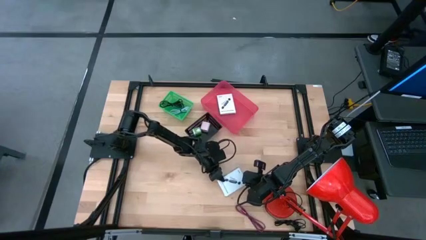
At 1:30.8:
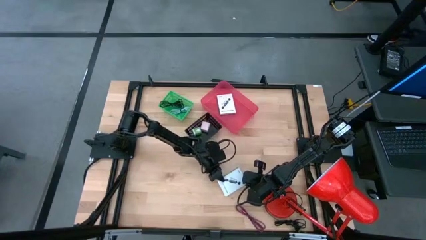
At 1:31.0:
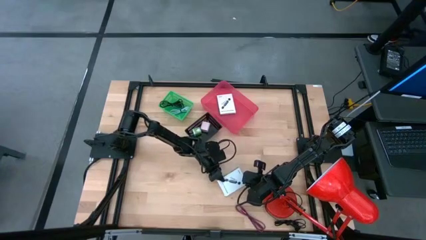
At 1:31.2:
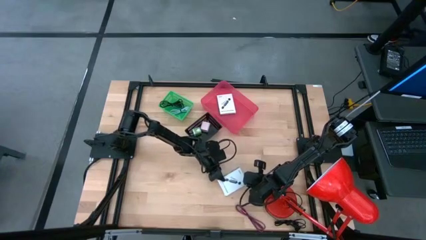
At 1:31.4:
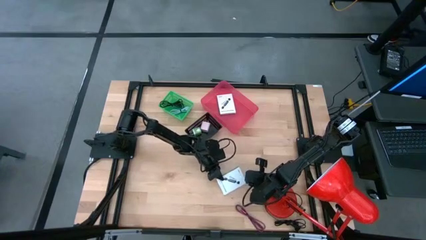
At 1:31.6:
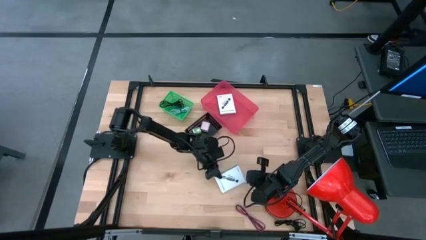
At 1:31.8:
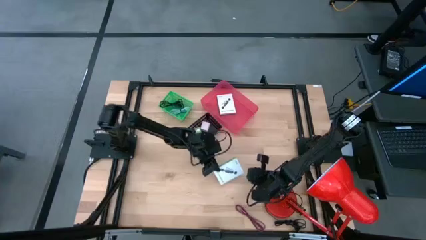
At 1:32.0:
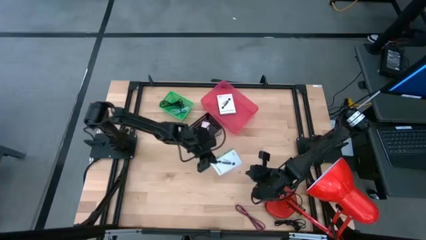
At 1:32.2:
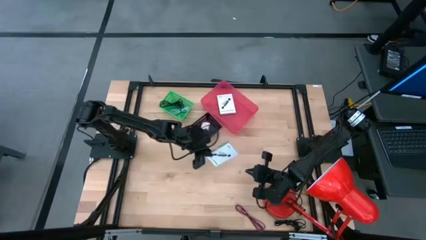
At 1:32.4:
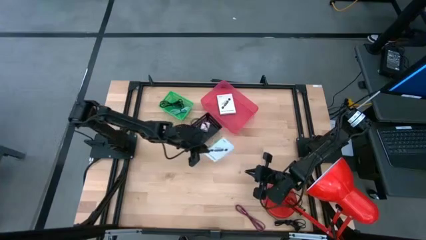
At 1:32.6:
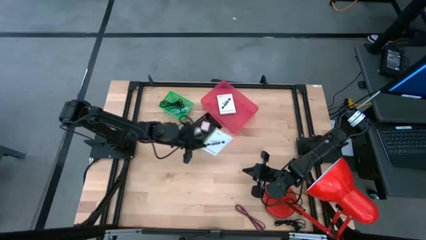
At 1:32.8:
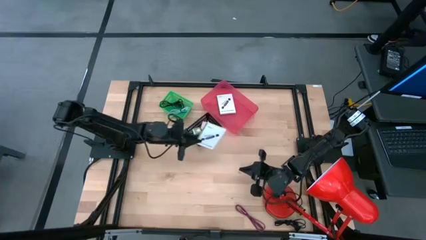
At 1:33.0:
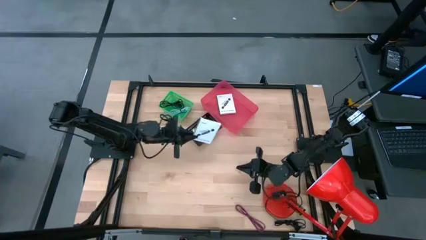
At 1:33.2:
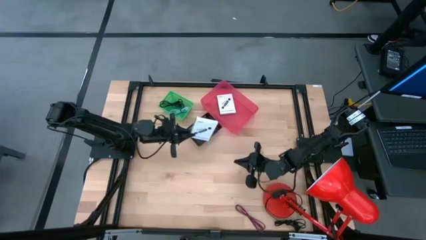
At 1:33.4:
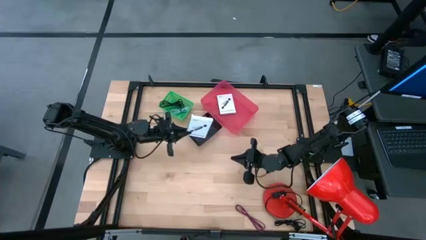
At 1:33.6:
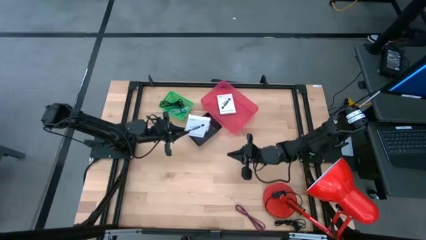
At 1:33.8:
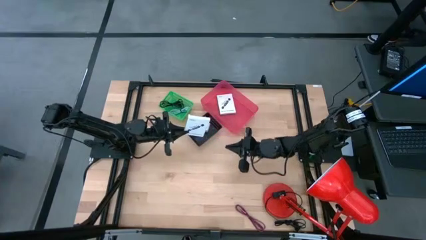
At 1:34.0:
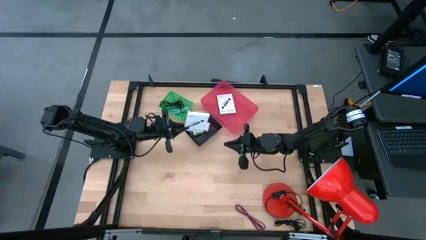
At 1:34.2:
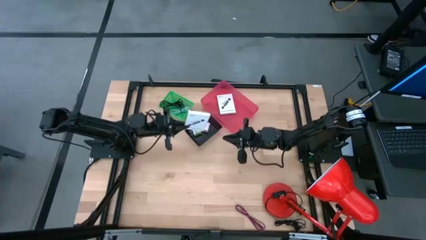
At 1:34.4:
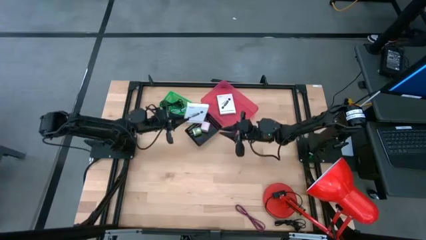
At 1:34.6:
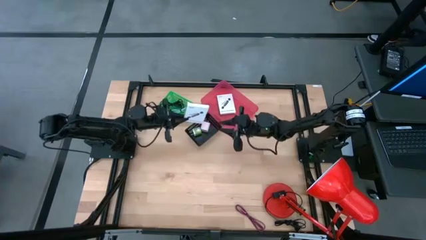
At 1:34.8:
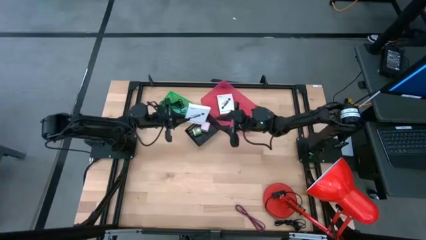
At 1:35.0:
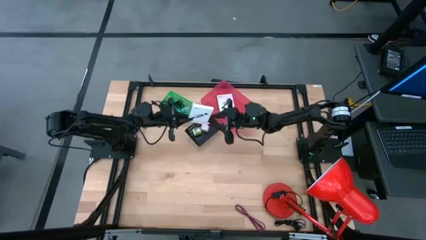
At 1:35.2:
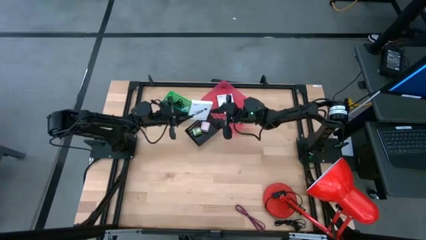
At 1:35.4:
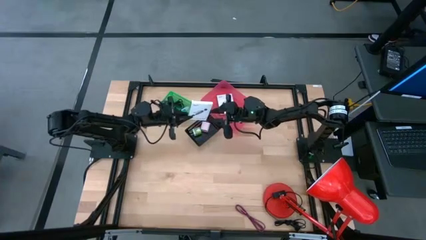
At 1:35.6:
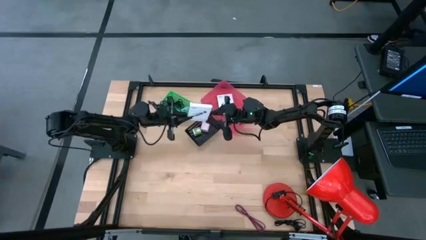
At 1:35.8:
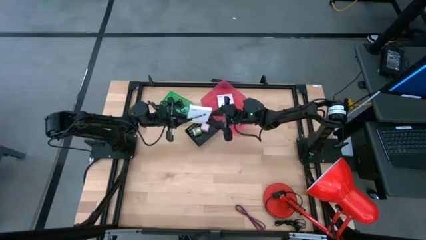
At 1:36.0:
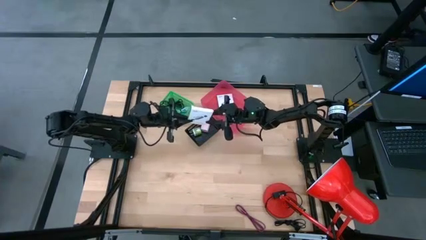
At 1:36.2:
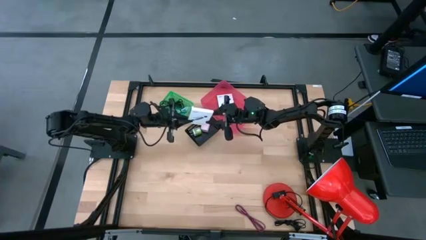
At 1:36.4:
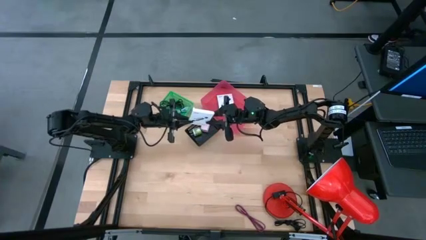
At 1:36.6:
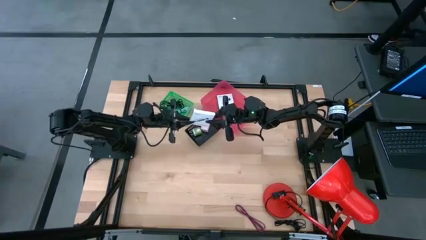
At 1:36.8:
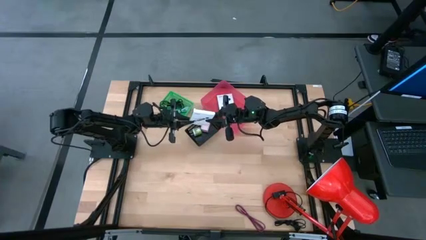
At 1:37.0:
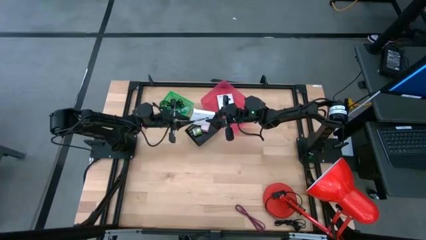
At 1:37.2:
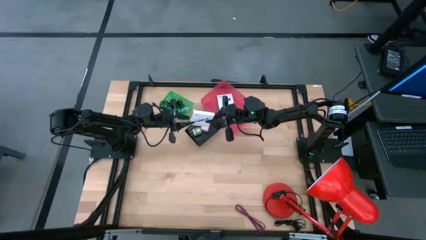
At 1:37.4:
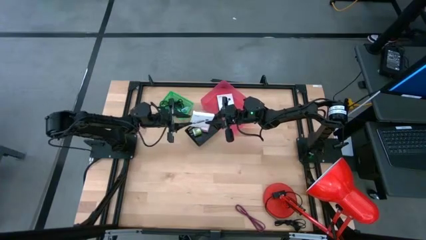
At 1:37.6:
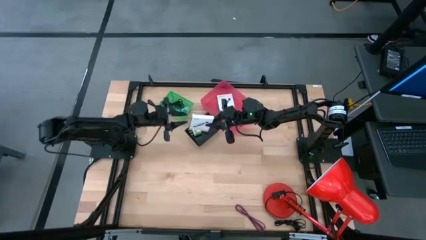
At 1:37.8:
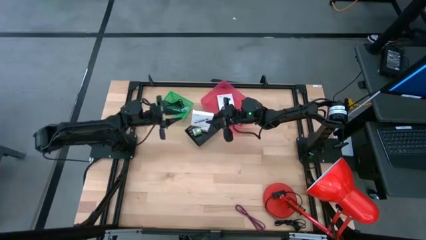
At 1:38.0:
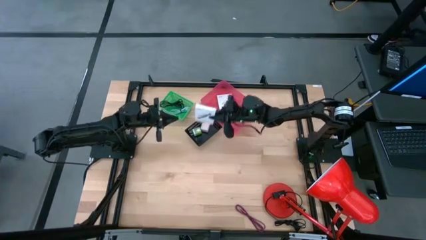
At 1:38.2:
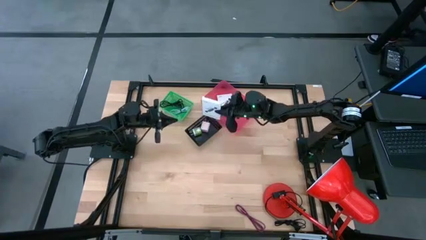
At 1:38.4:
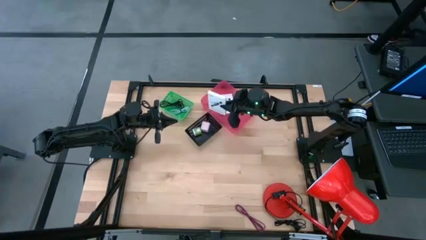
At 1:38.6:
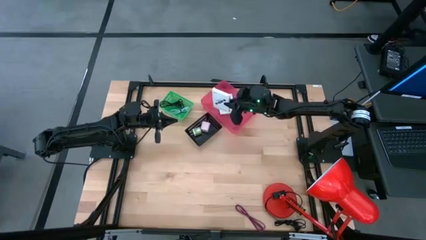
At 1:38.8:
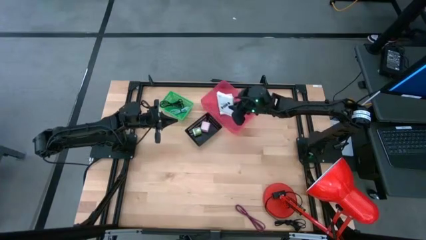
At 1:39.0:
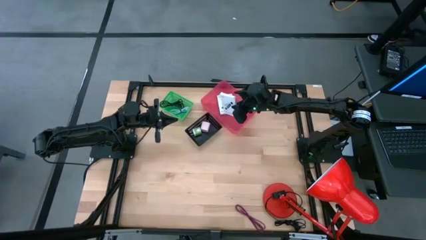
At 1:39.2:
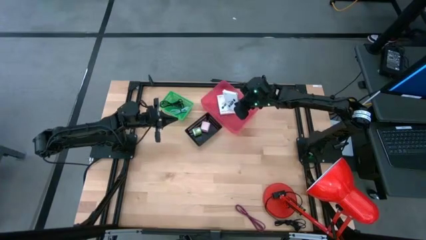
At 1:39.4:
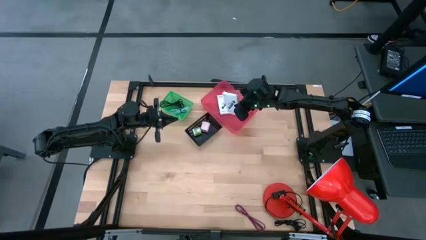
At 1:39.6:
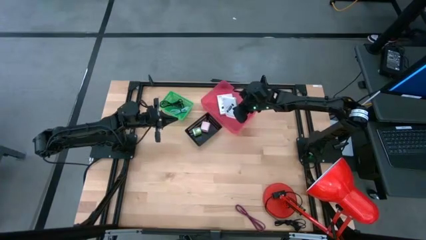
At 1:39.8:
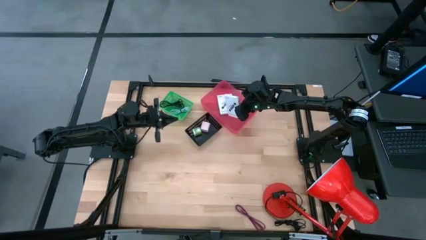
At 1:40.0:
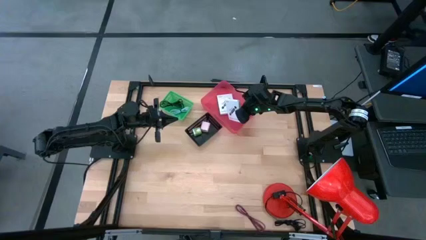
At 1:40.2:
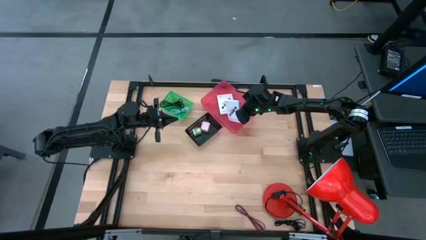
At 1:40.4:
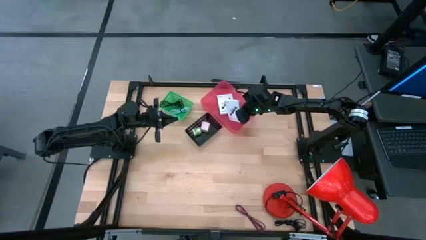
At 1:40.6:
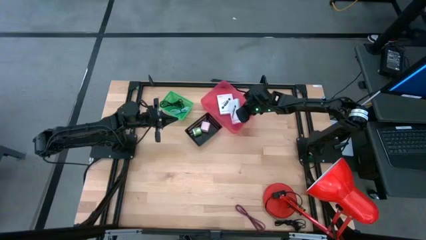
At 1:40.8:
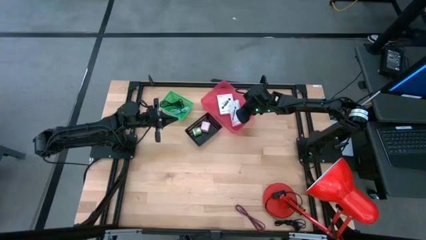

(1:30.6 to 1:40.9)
Task: Pick and place items into bin
Put the white card reader box into the red bin

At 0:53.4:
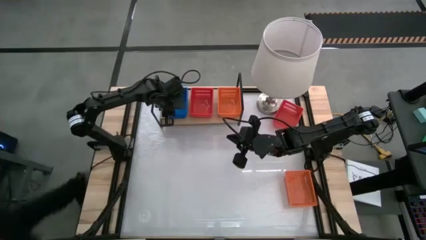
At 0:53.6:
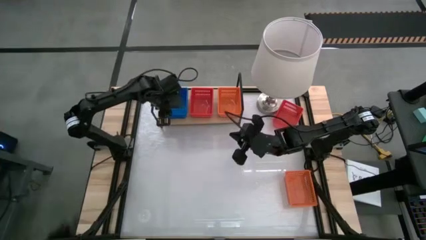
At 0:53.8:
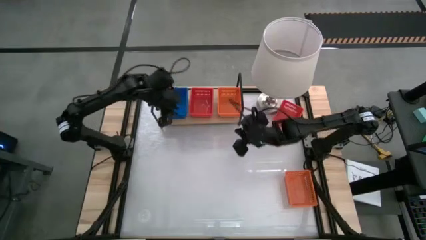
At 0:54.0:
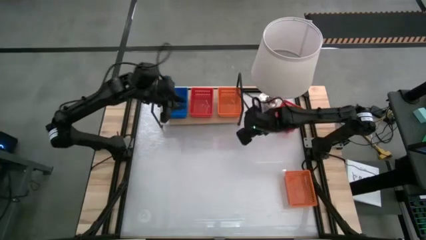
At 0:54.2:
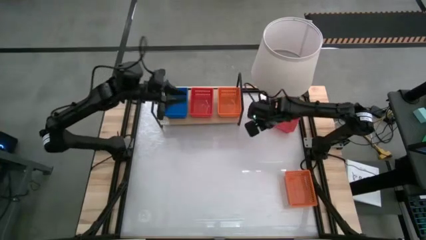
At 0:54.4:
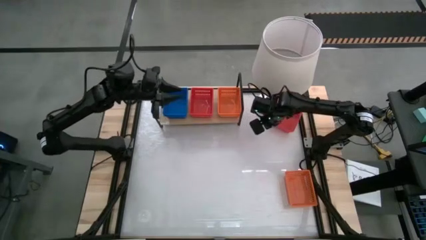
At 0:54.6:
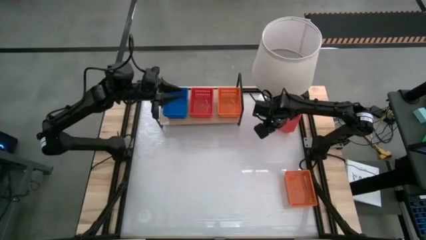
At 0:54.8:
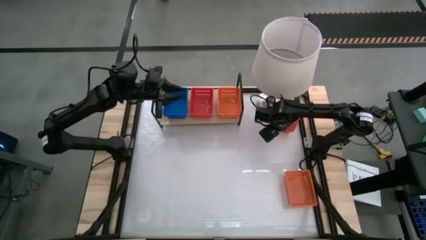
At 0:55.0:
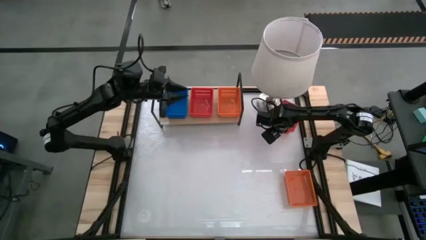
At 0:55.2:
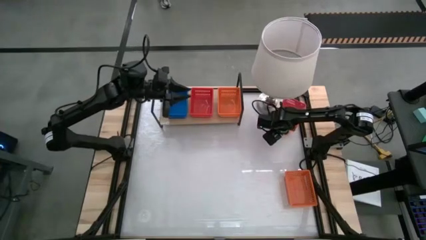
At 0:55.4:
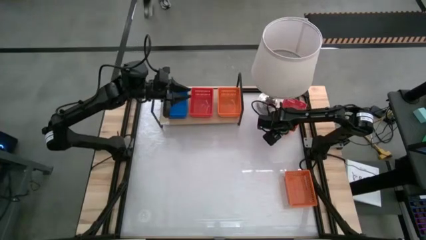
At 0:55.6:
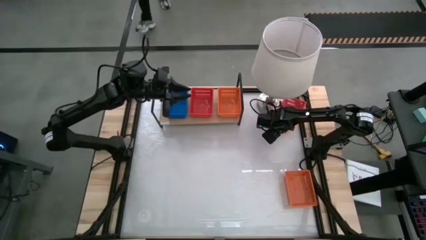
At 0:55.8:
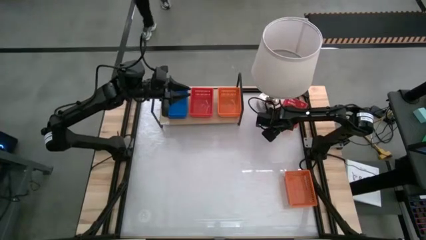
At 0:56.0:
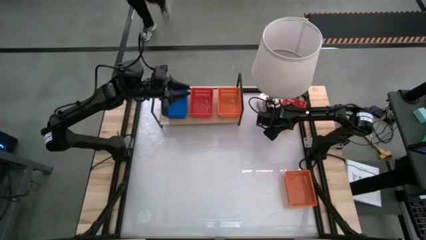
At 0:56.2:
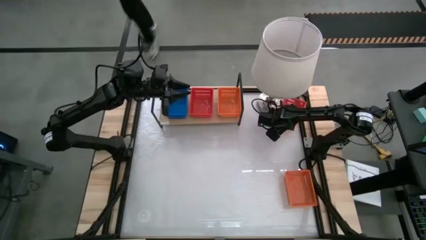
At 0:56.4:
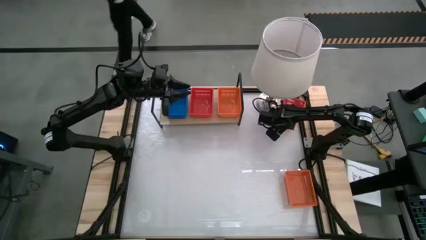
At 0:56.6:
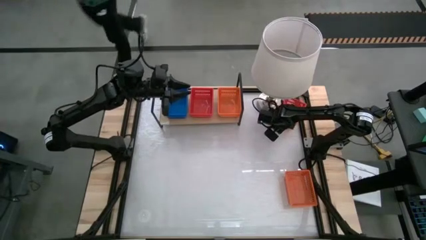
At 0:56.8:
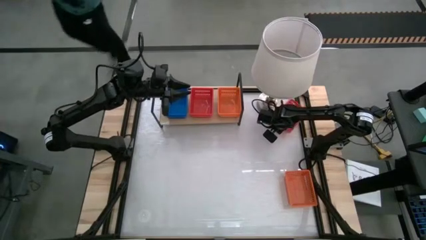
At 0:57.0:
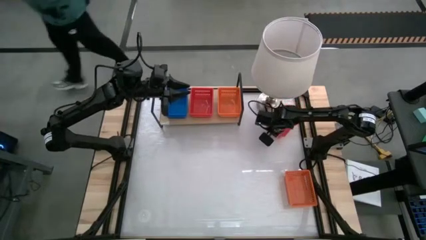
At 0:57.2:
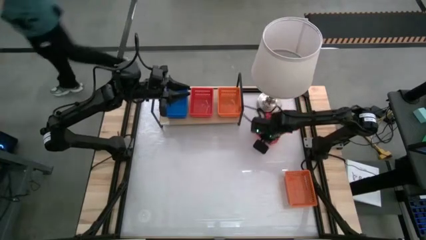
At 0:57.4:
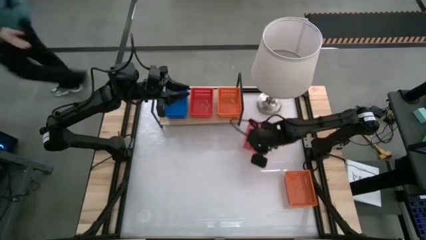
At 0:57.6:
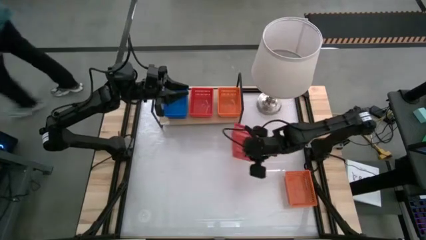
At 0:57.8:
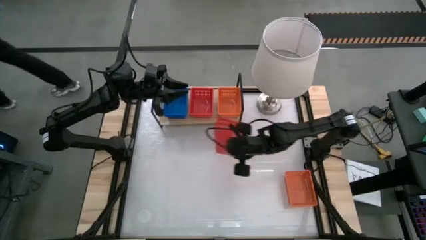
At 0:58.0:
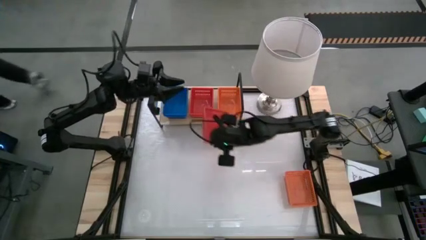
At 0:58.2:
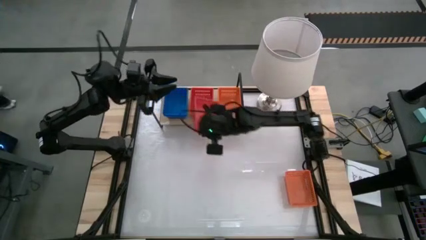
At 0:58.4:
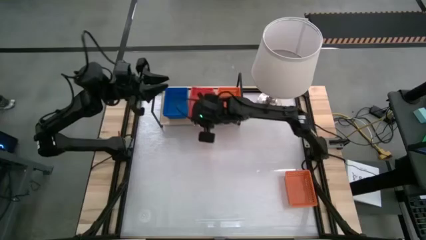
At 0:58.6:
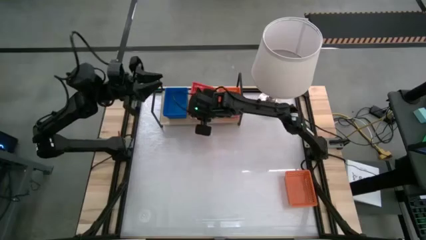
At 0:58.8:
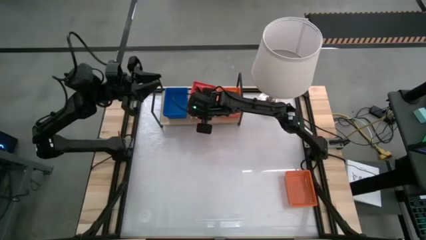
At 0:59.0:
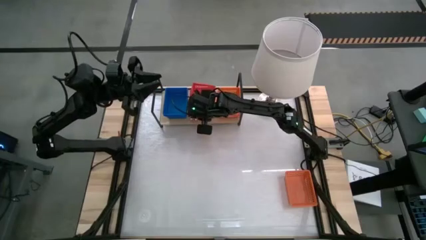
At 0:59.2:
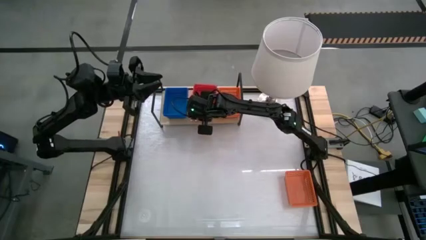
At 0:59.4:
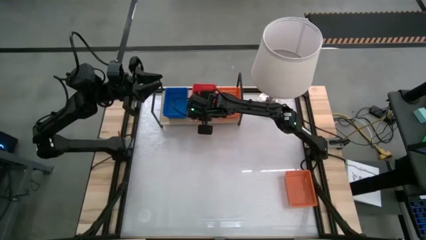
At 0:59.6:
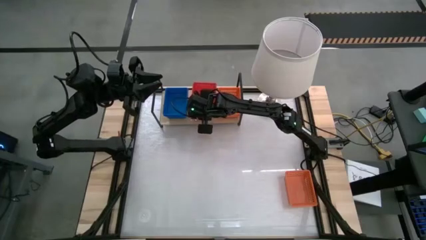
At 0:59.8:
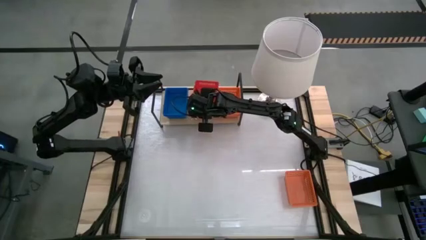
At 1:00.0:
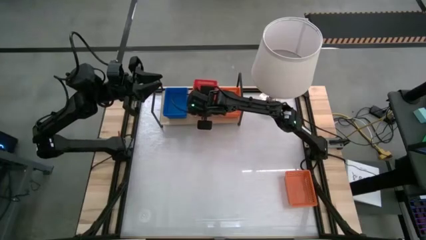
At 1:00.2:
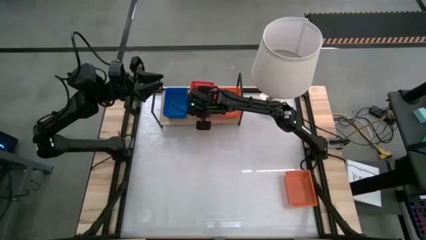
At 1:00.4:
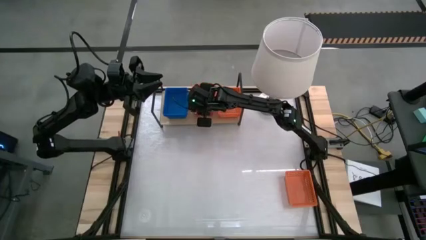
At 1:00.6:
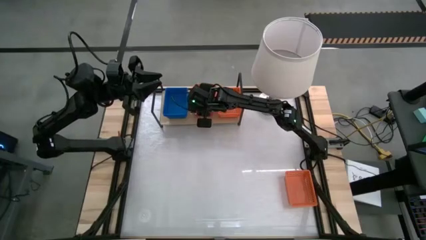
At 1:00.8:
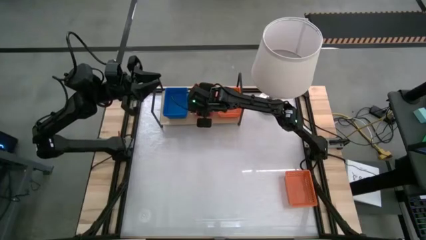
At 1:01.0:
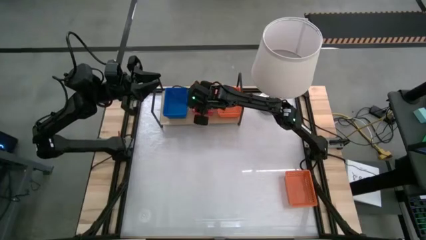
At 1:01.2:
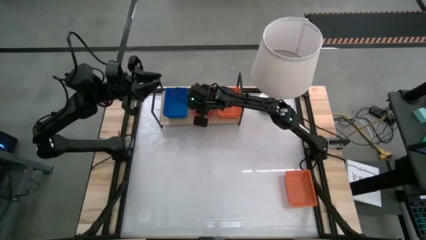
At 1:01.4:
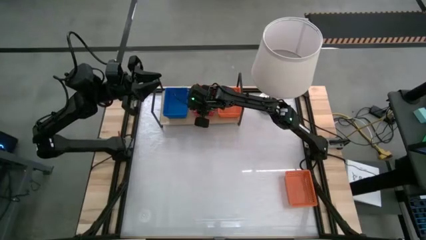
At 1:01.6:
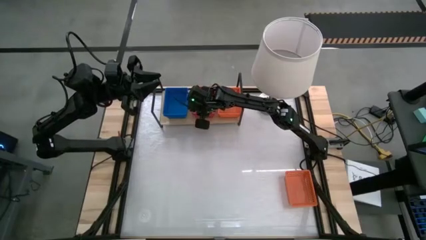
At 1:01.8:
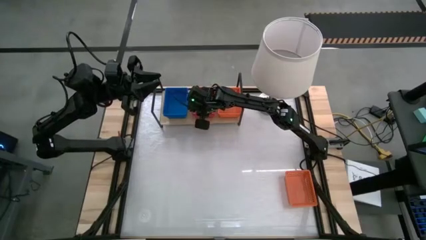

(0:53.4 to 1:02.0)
Task: Stack baskets on shelf by color
Stack the red basket on top of the stack red baskets on the shelf
